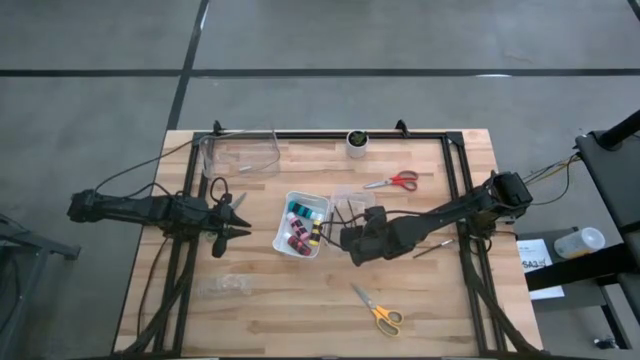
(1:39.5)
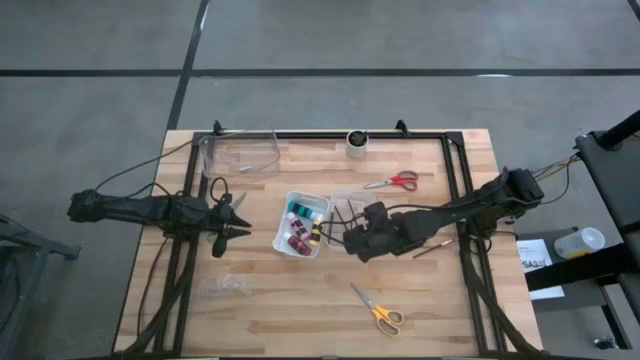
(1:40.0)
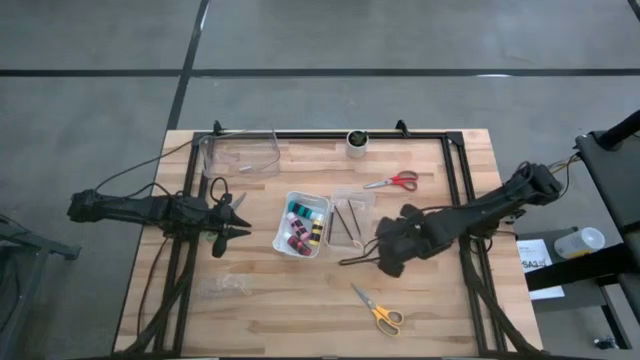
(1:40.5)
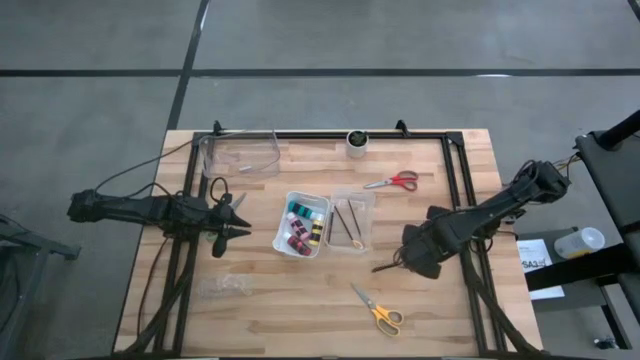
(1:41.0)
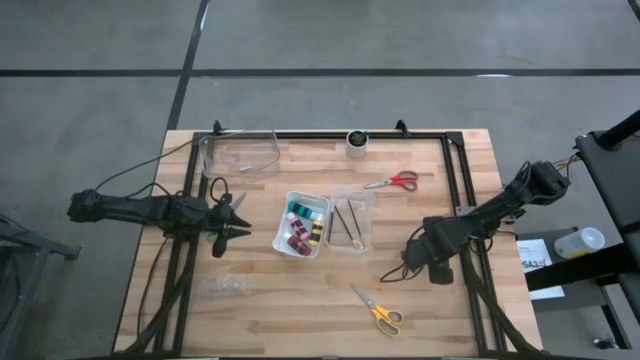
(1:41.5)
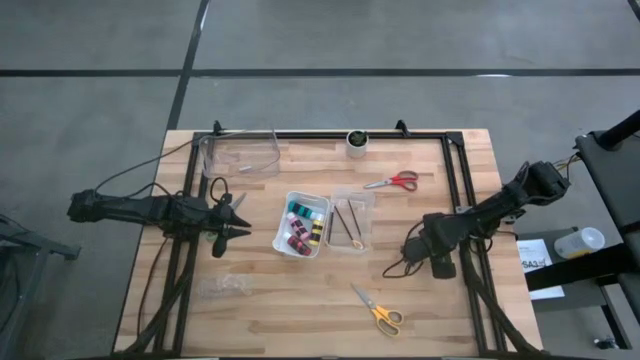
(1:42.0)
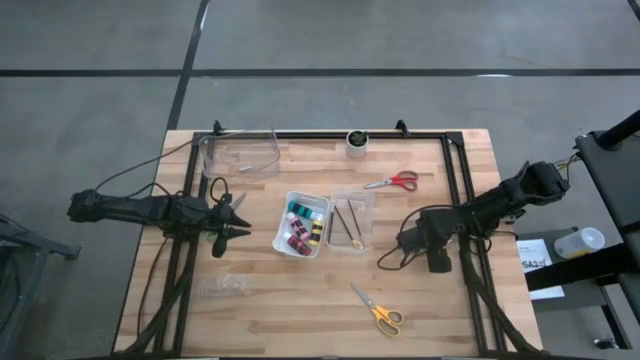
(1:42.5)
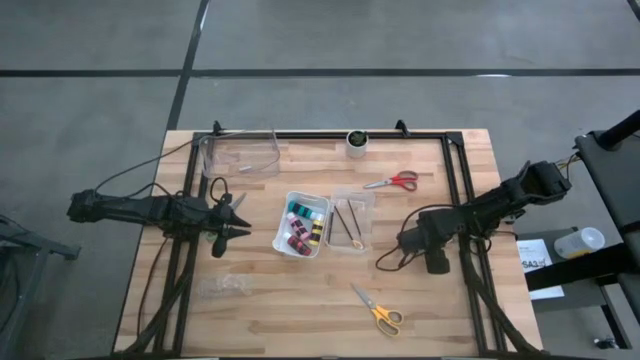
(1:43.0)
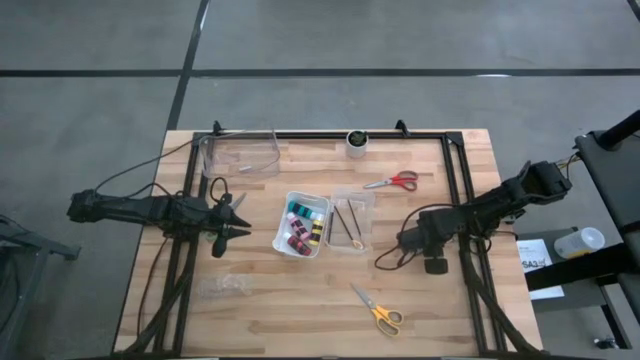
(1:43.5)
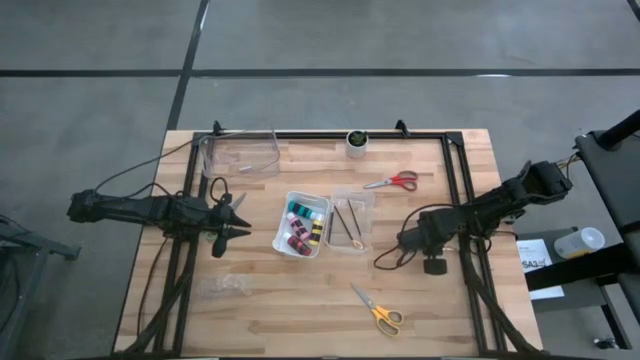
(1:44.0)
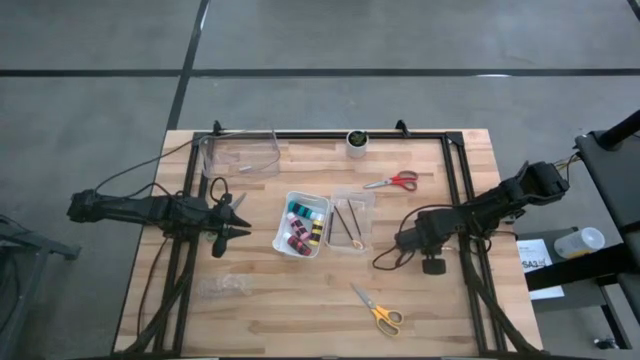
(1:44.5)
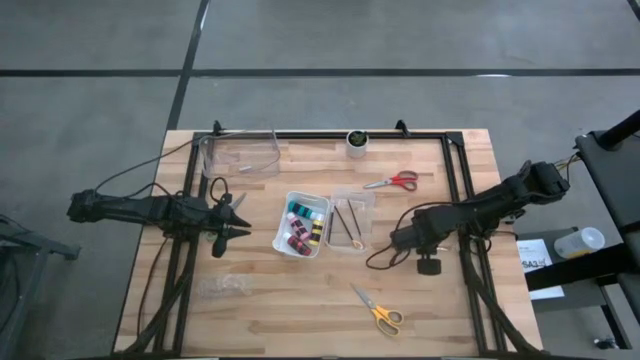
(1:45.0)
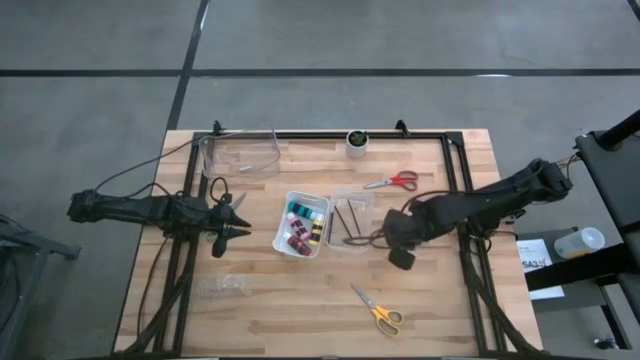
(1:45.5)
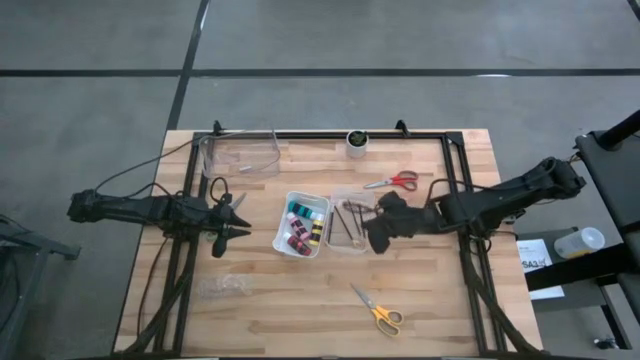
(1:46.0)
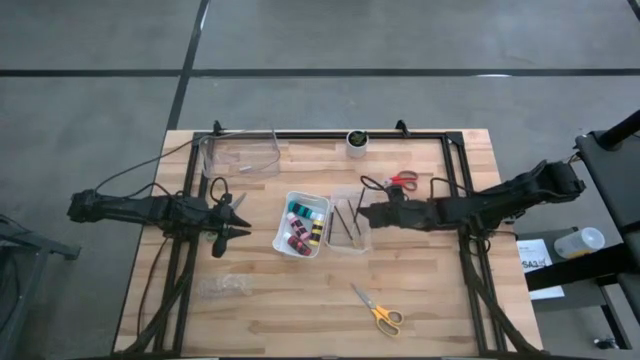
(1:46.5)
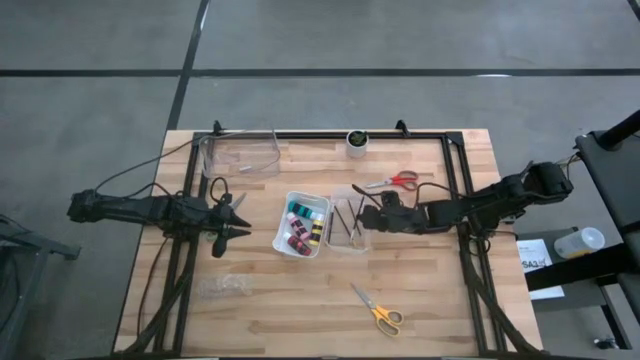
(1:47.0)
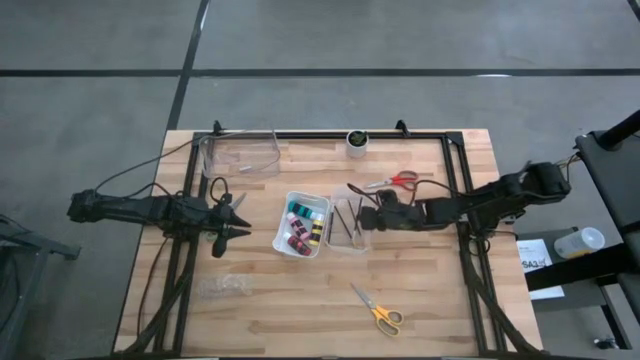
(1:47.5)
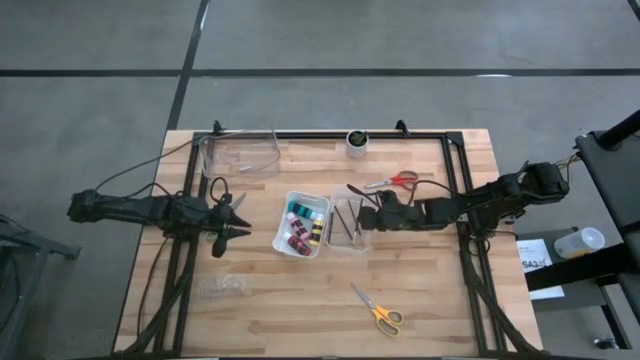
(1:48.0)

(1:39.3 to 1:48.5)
Task: Pick & Place Paint Supplies
Put the silver paint brush into the bottom transparent bin

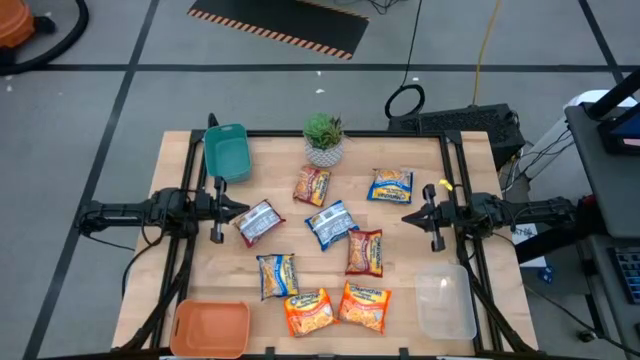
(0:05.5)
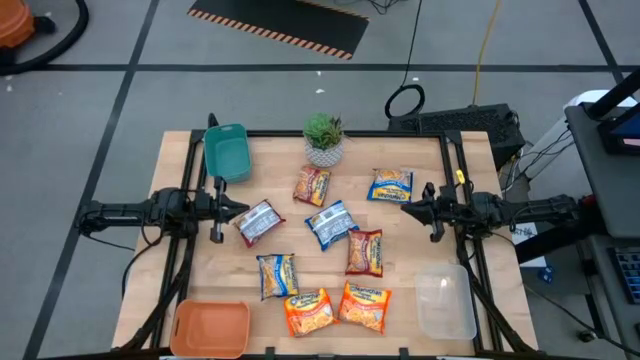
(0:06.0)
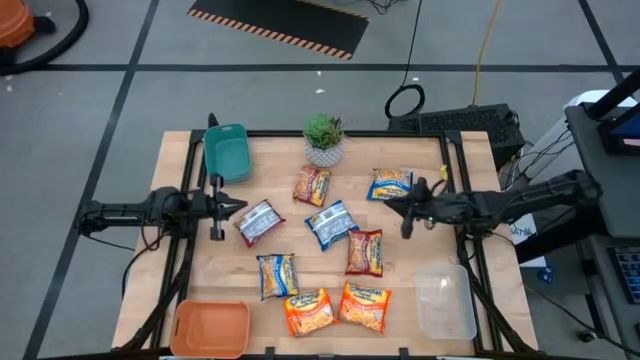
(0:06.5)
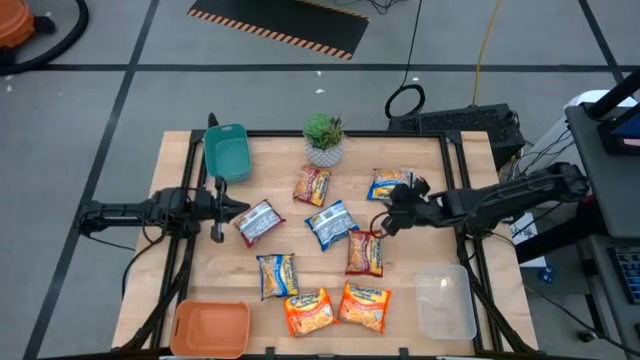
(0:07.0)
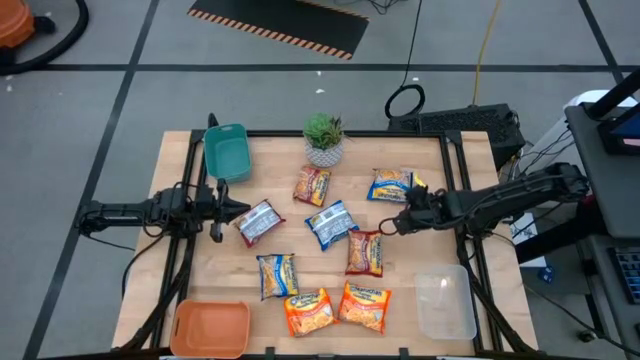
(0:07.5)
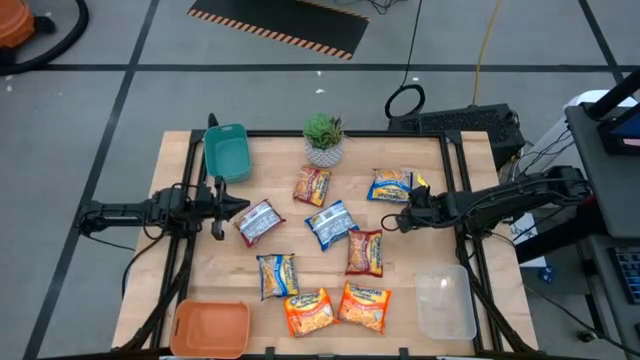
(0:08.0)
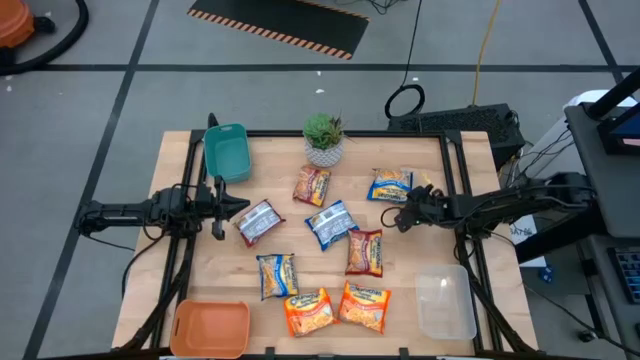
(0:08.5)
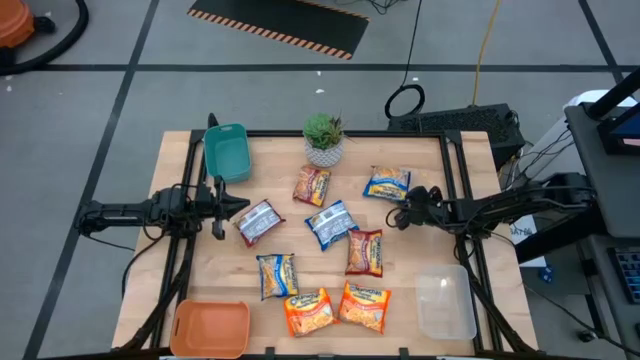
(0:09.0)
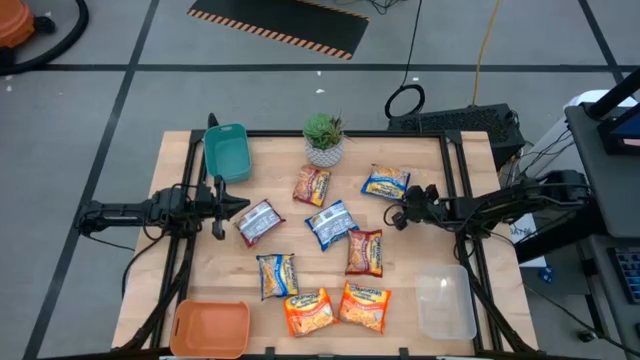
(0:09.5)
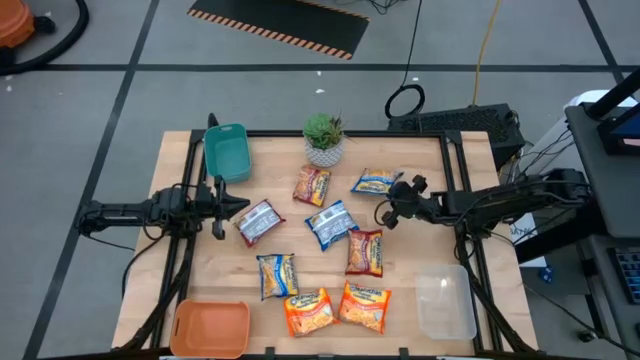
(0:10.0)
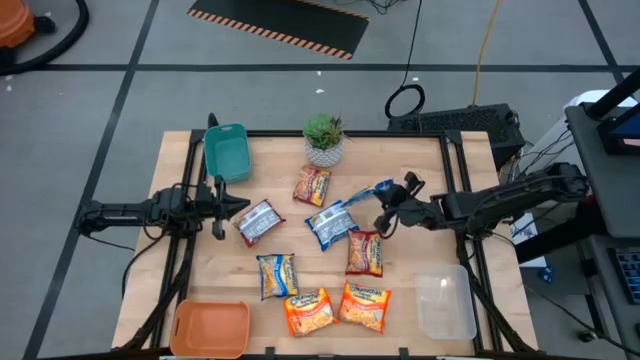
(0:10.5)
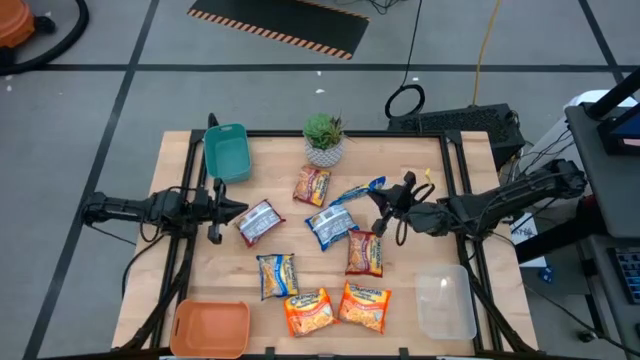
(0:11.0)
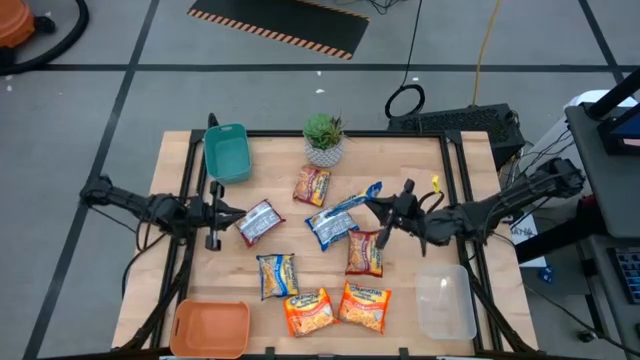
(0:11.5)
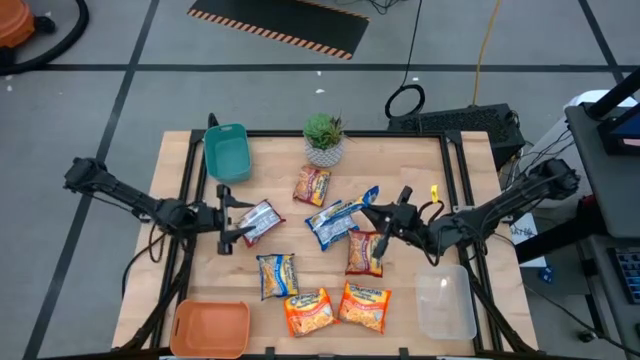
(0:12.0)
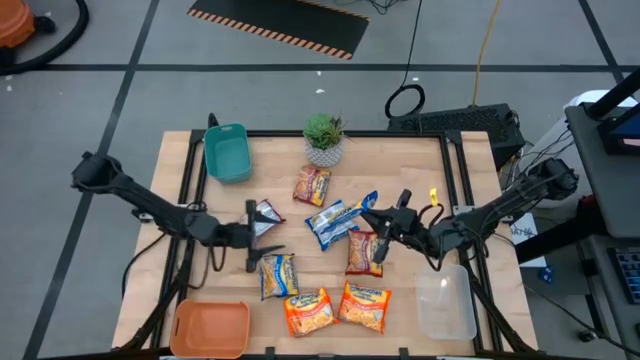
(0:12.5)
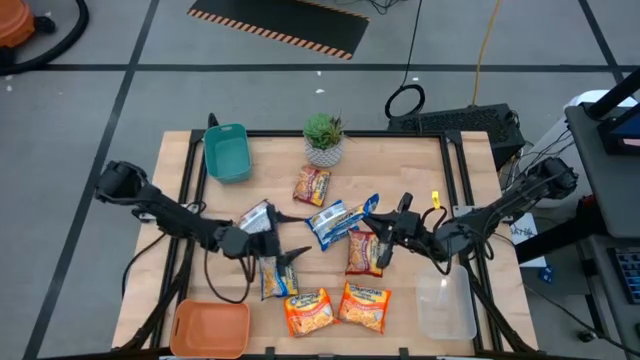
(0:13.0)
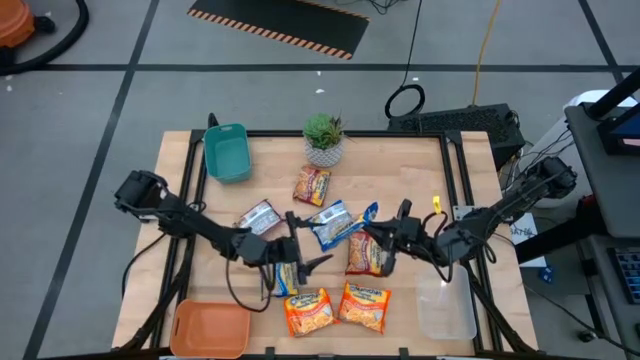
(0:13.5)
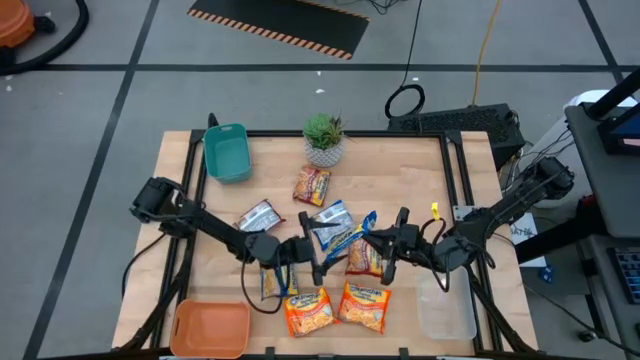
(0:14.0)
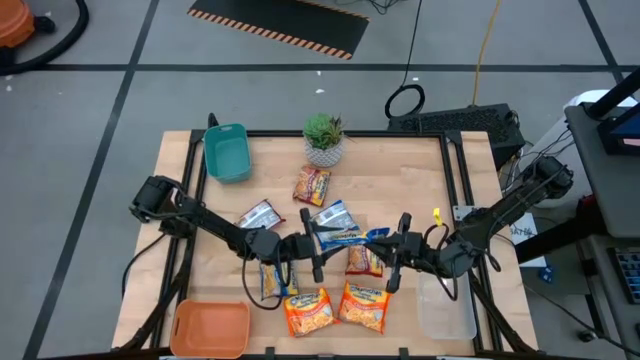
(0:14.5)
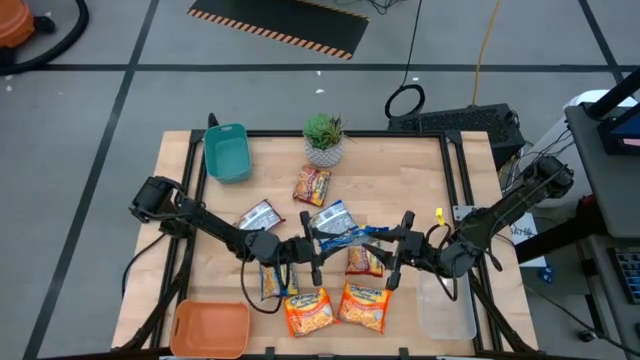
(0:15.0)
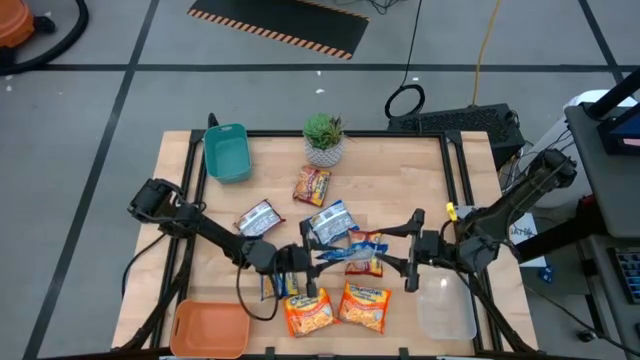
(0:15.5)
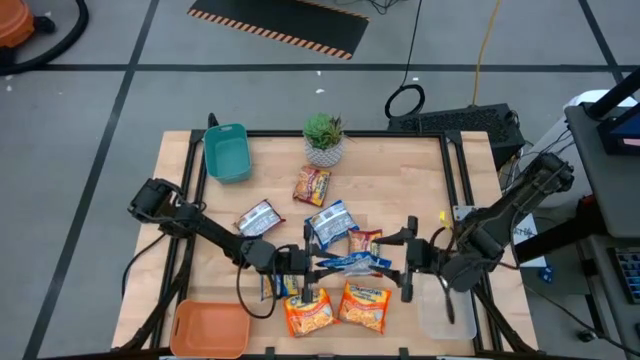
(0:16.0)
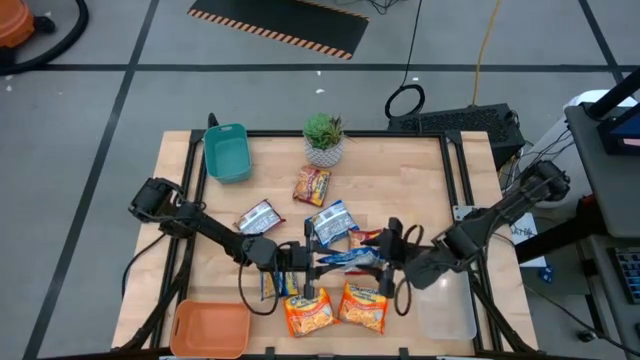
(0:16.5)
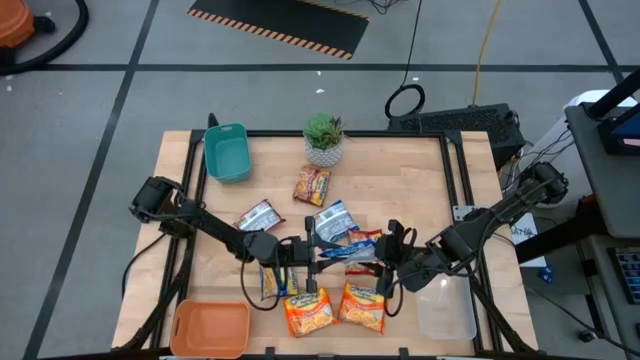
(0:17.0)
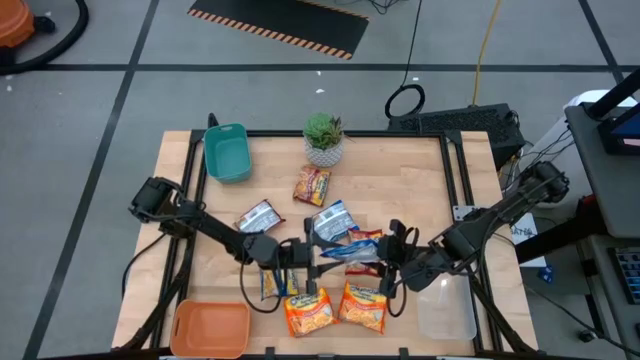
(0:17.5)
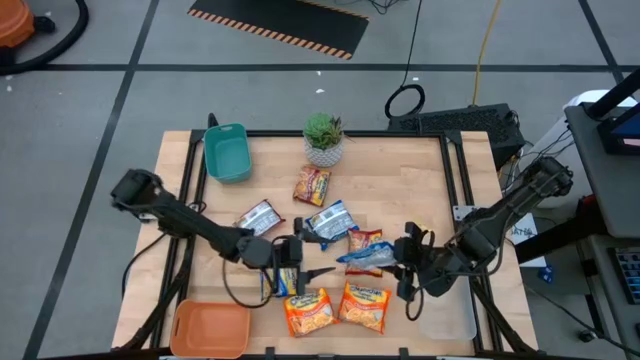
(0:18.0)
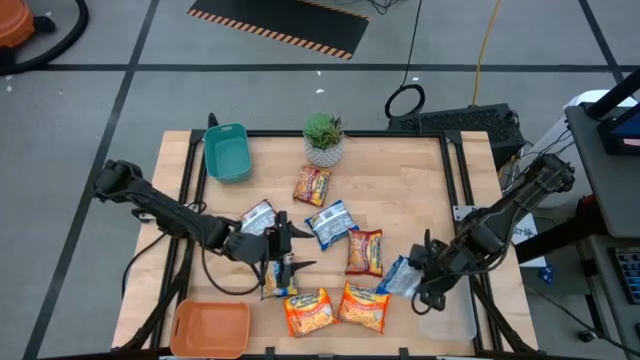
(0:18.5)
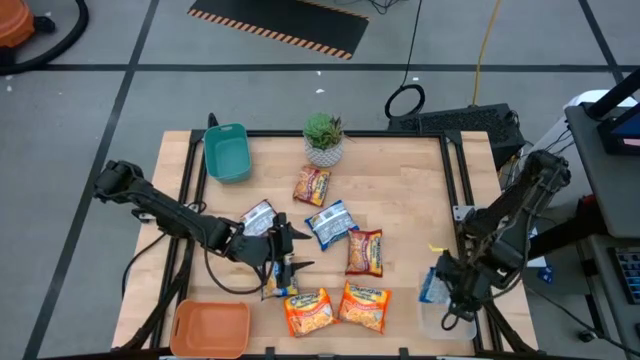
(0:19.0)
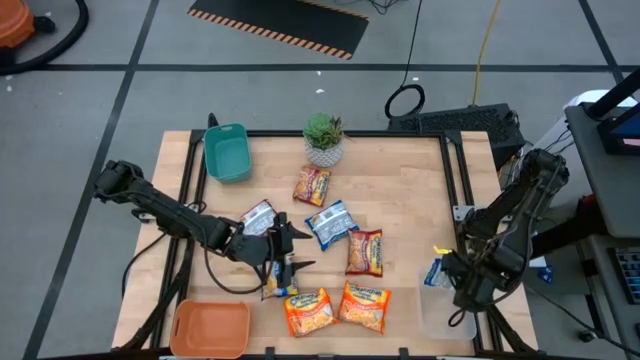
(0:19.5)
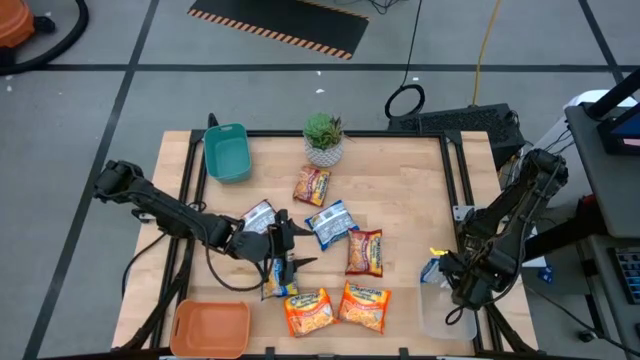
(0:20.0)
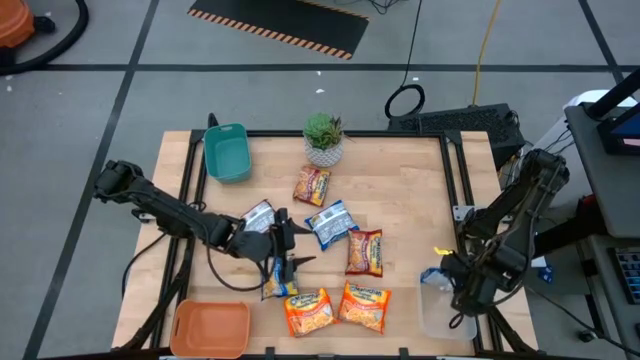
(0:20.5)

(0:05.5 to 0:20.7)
Task: Sort Maruchan noodles
Put the top right blue noodle pack into the transparent bin
